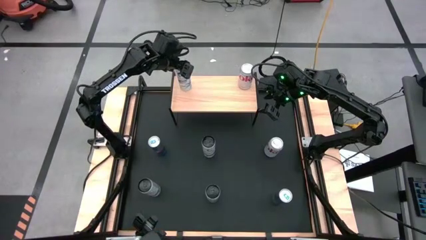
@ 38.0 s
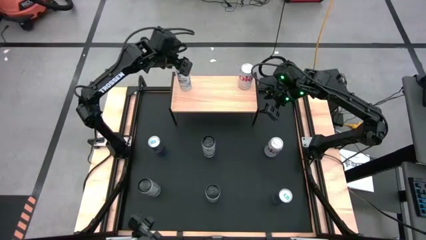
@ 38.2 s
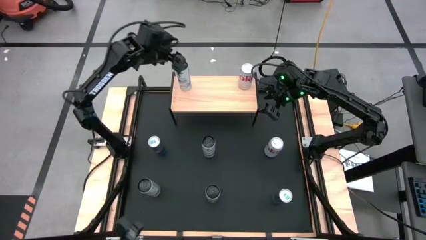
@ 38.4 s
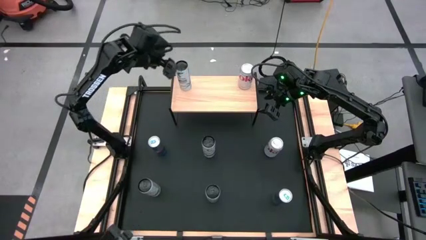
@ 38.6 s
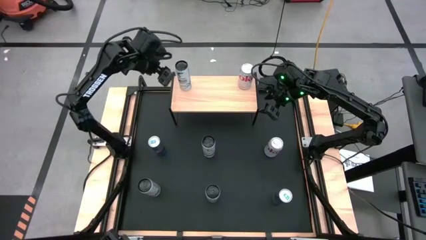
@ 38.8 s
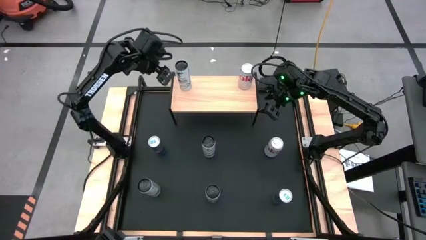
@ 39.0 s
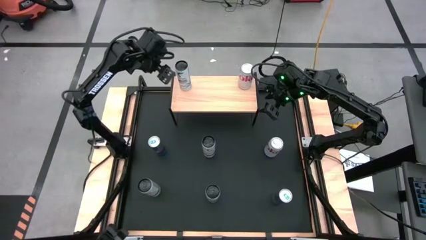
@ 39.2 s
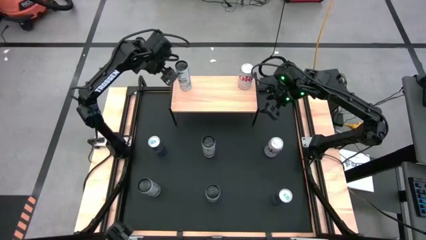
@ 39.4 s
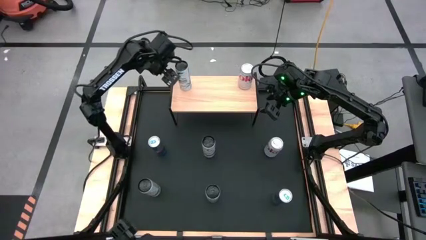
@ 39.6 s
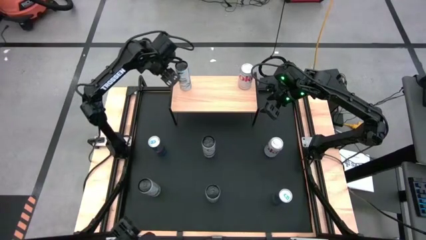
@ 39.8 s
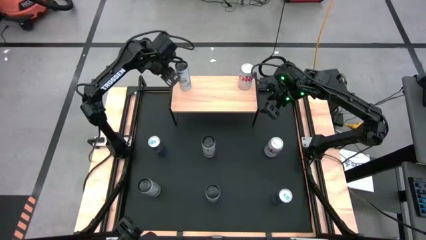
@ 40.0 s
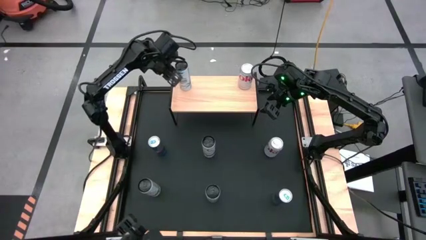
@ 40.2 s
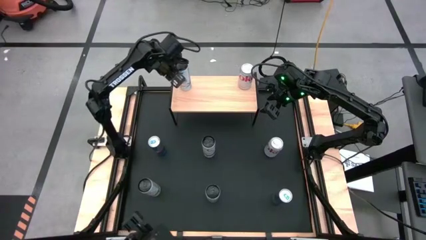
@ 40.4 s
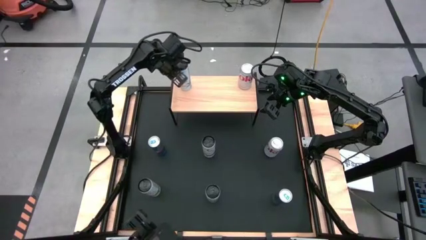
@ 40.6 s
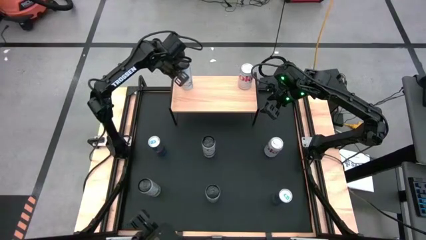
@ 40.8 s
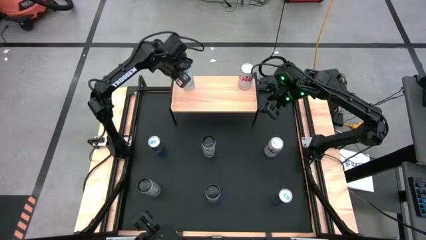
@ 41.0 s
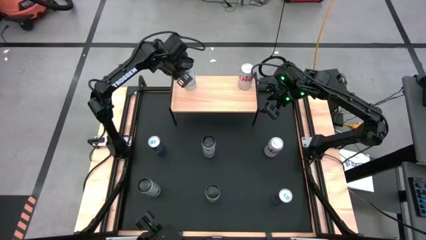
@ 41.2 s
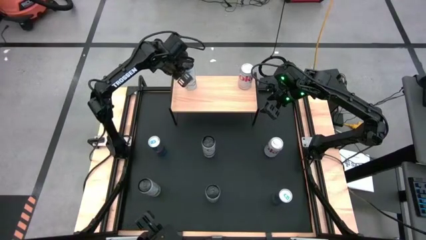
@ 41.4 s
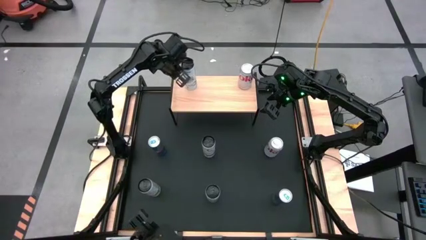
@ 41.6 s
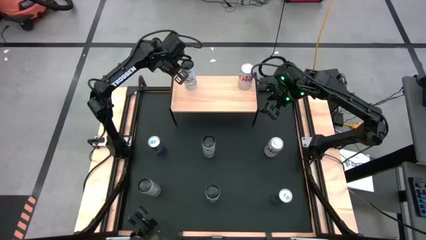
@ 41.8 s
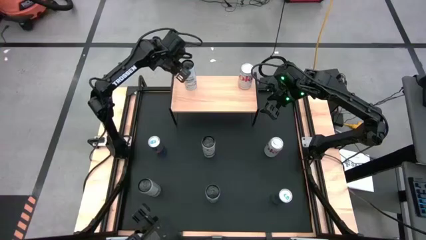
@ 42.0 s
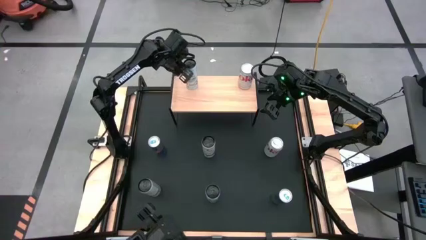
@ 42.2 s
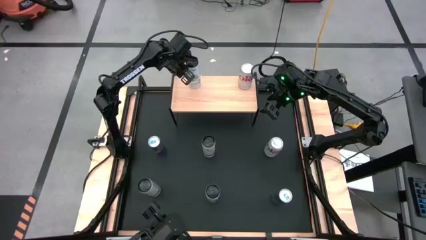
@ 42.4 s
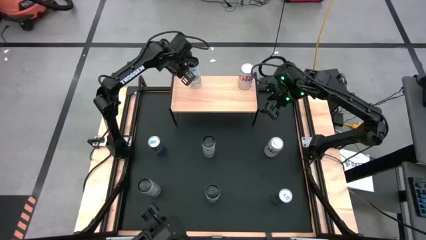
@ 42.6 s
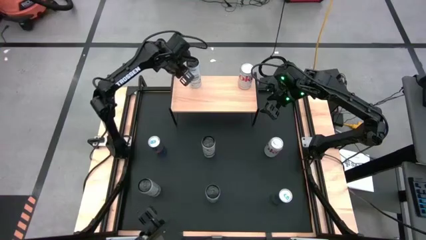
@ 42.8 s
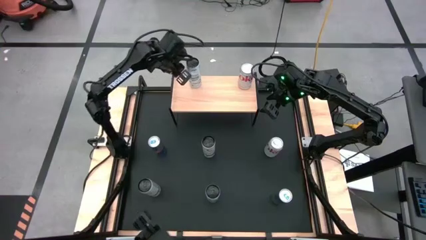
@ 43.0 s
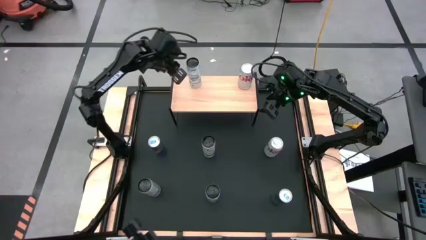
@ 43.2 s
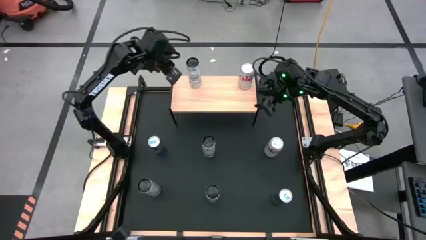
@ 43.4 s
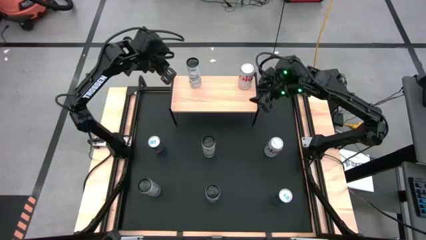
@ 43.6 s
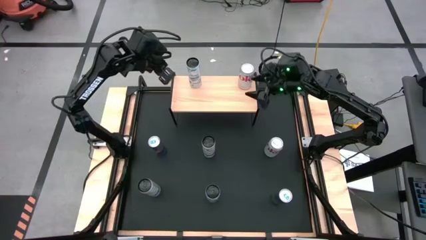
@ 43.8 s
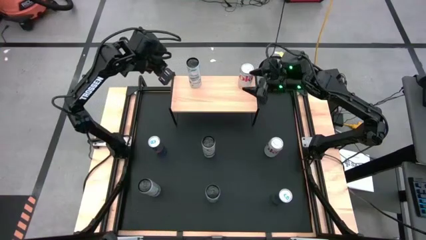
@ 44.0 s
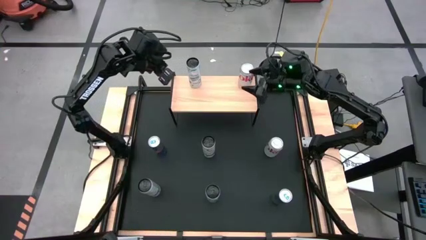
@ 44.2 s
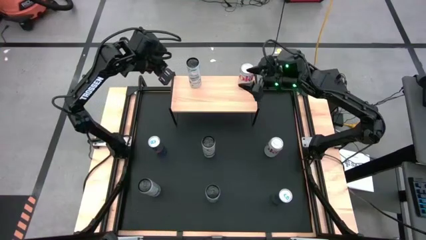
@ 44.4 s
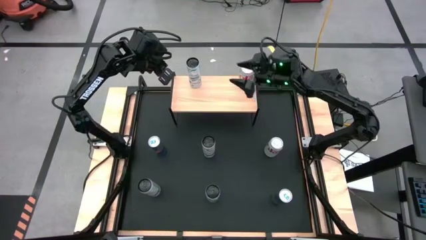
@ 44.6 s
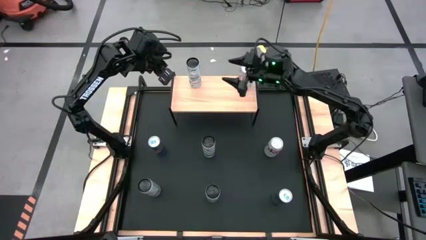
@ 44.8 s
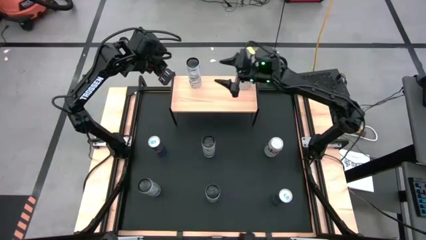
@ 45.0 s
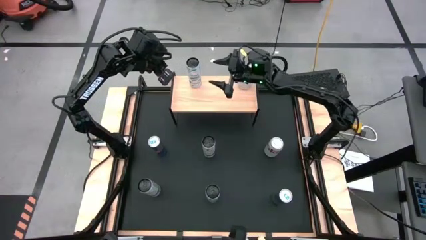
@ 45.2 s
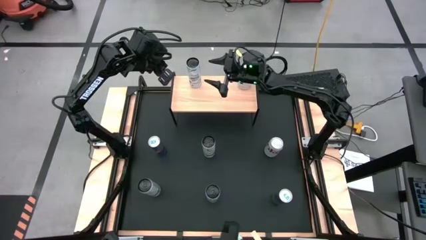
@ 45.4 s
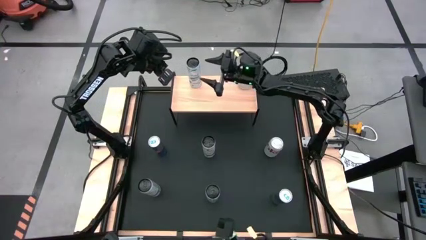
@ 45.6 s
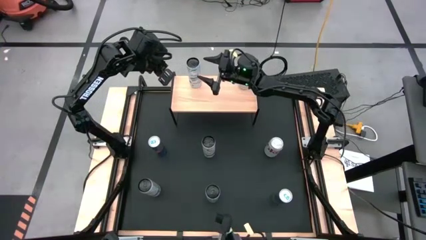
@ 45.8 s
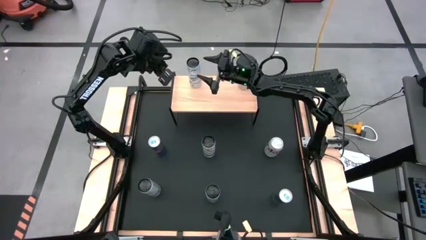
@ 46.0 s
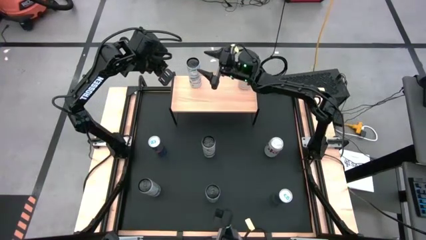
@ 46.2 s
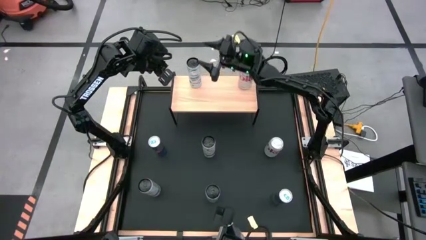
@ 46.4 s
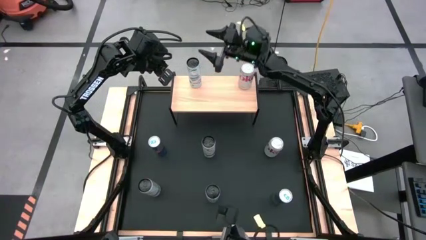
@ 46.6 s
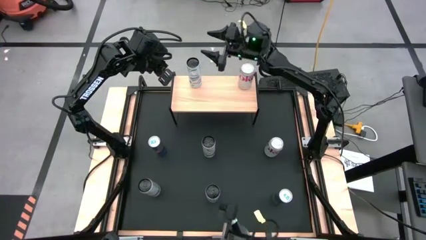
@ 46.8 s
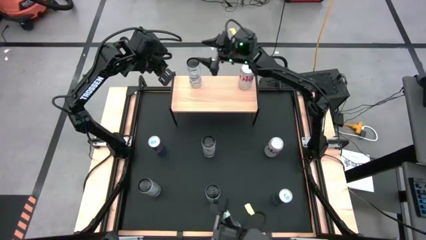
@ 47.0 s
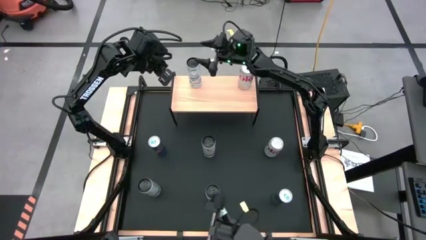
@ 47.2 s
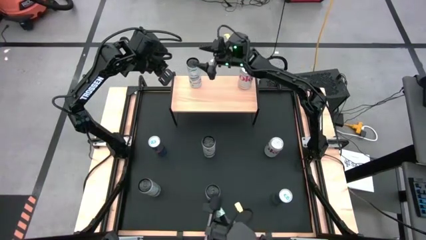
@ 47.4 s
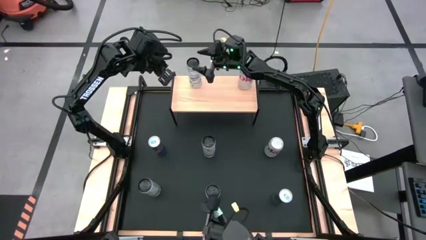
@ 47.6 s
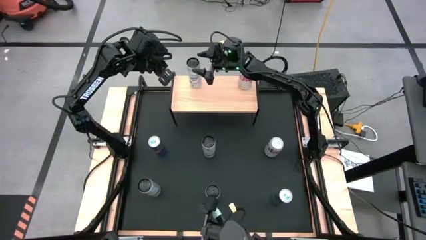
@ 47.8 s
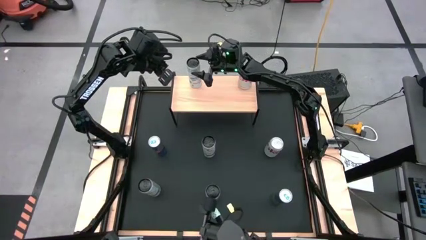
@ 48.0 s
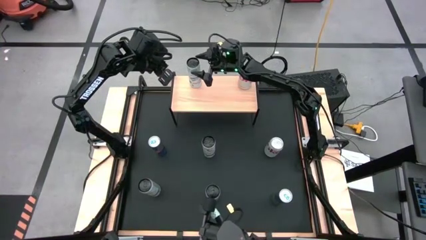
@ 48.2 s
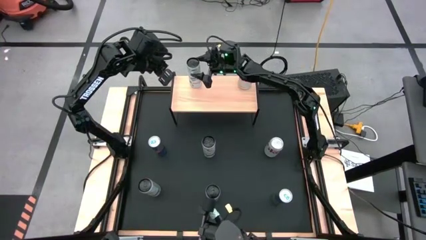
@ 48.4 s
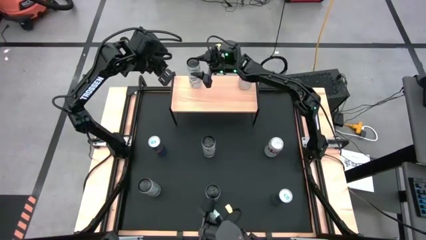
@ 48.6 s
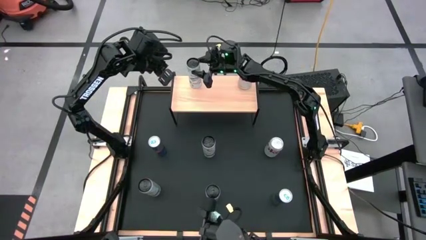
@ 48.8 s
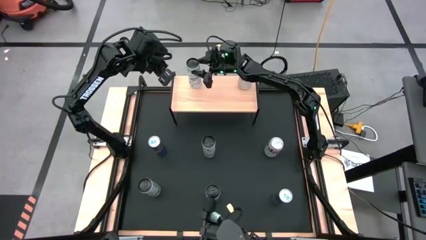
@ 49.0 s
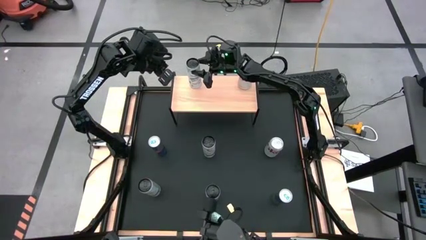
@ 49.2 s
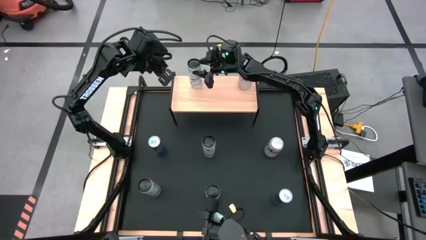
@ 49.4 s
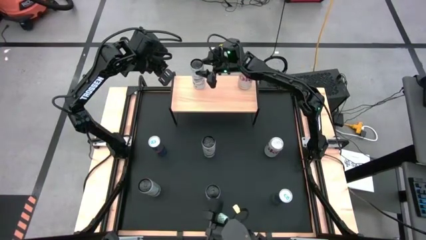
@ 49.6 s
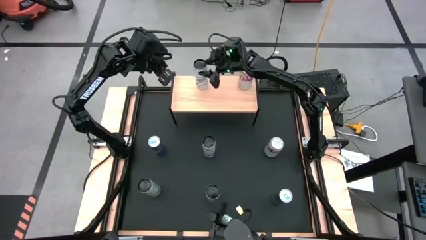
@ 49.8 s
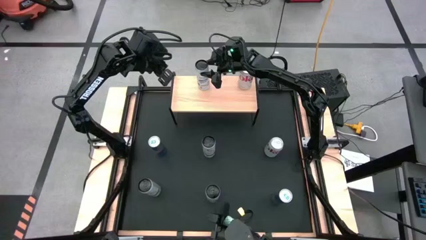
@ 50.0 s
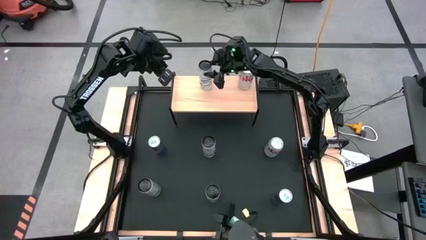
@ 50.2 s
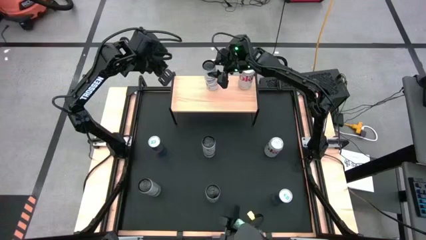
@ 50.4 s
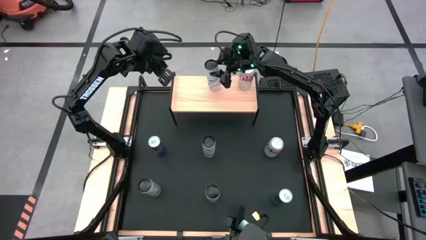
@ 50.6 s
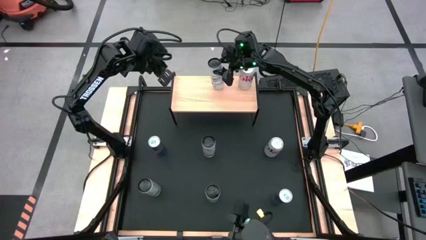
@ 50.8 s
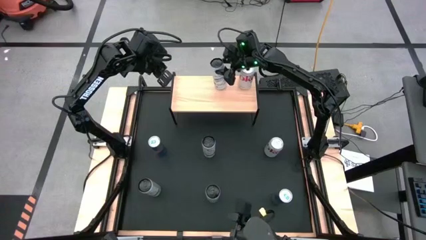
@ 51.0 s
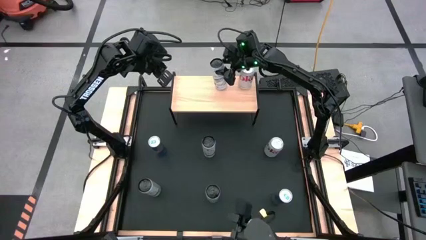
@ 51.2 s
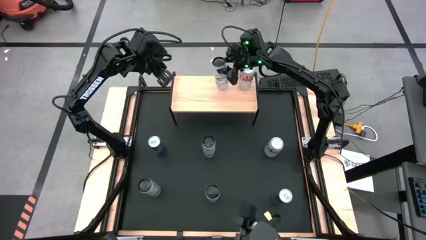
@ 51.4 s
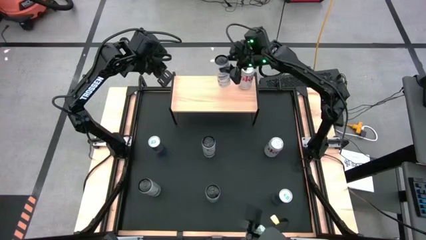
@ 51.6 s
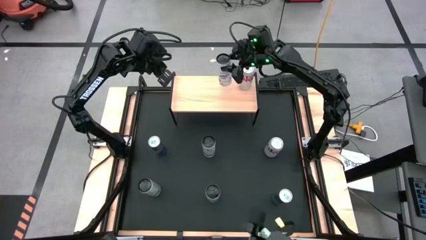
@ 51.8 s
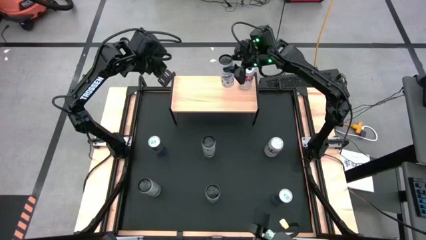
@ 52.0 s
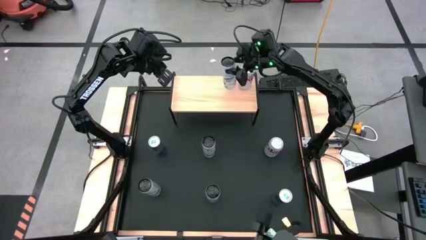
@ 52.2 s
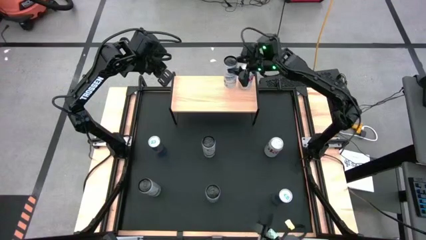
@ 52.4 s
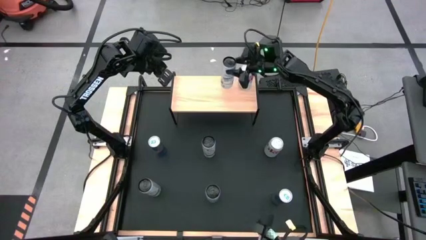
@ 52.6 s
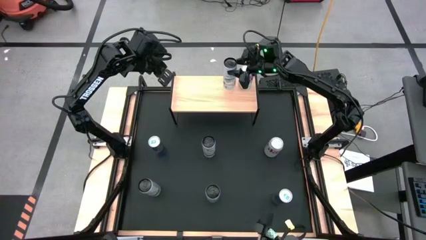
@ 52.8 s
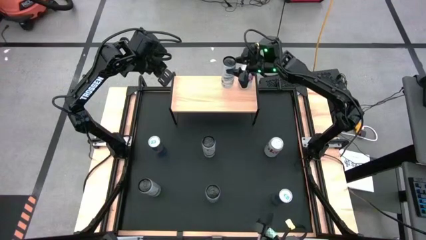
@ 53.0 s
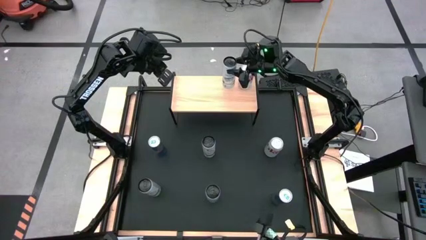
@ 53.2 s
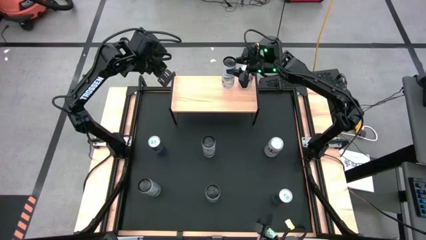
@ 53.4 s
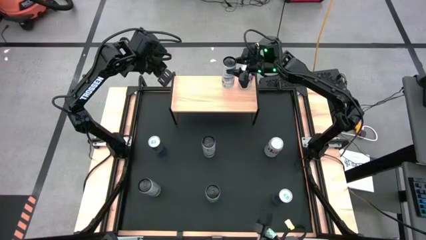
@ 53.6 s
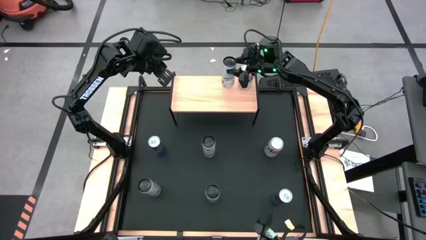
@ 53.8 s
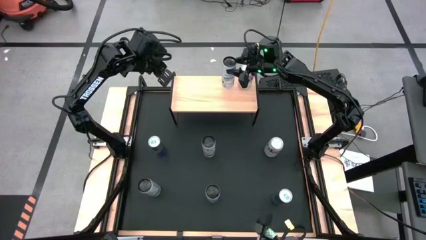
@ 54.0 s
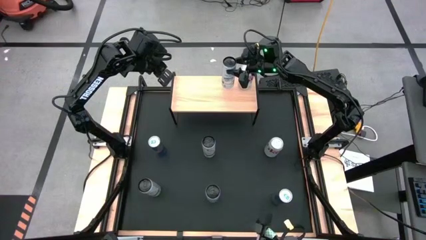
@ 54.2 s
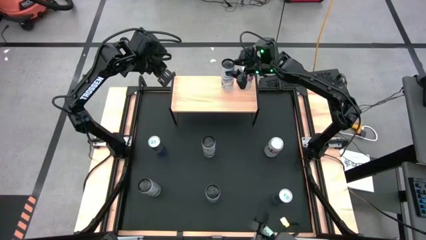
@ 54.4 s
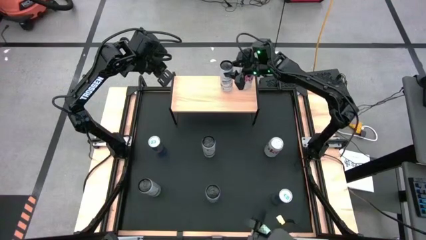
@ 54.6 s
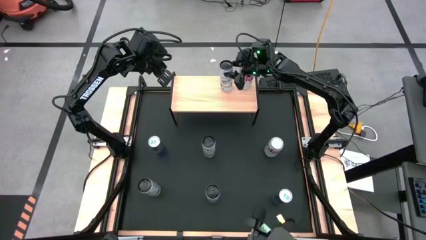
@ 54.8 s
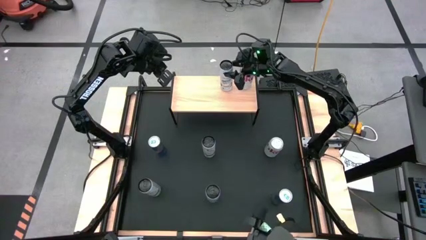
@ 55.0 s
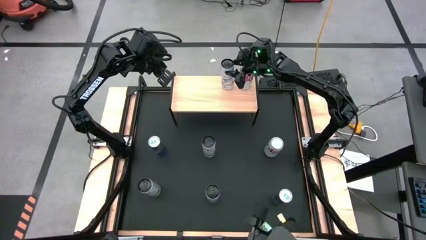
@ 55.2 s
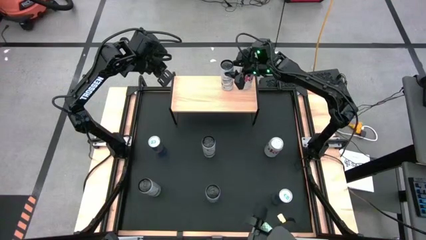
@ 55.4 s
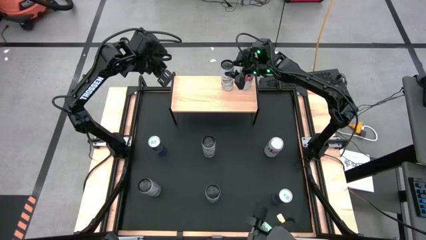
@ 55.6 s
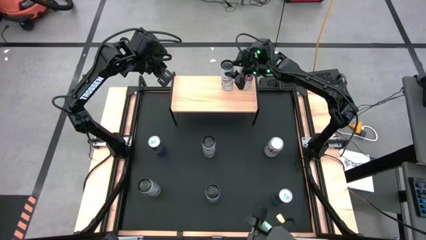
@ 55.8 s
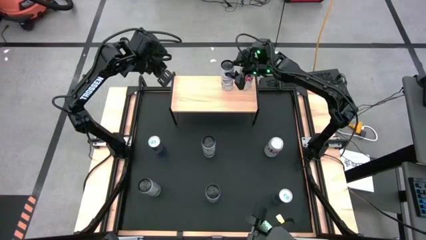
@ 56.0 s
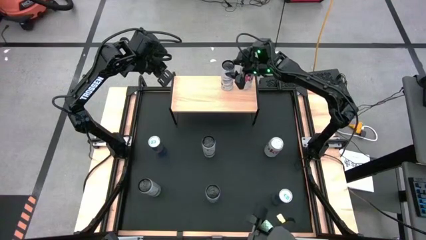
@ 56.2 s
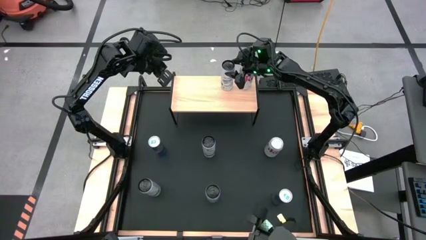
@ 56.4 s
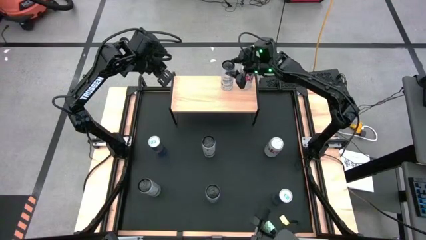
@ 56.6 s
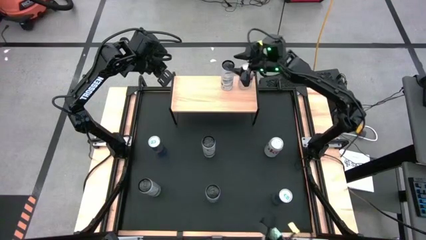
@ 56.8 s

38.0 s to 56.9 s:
Task: Place canned beverage on shelf
Adjust the white and black soda can
